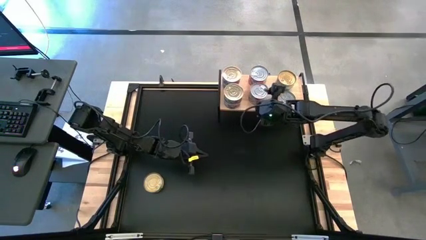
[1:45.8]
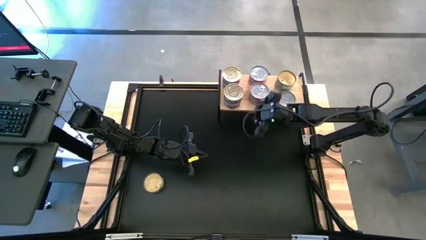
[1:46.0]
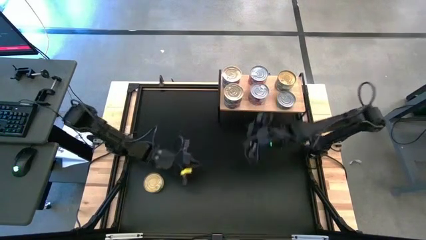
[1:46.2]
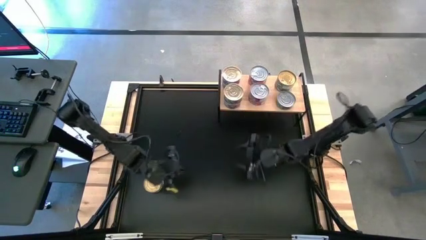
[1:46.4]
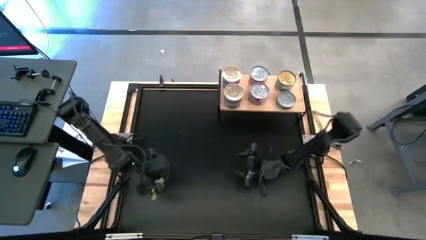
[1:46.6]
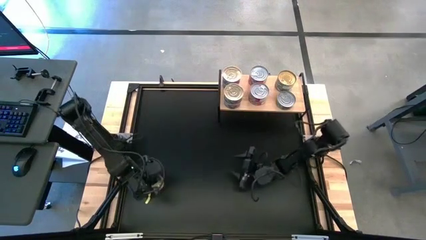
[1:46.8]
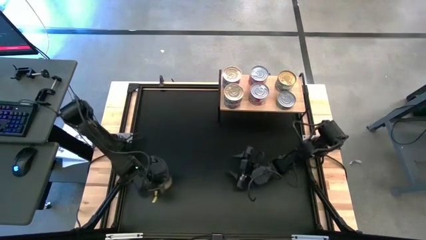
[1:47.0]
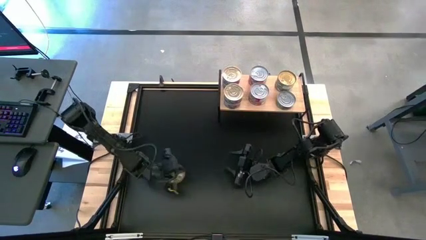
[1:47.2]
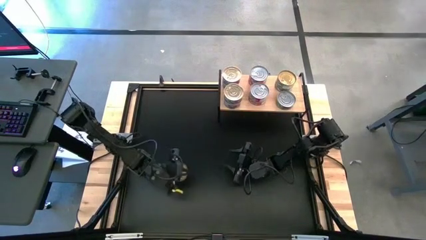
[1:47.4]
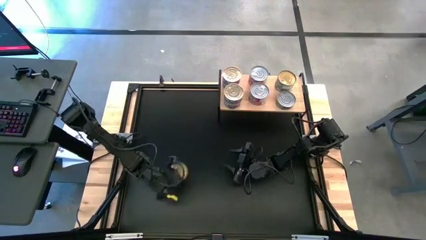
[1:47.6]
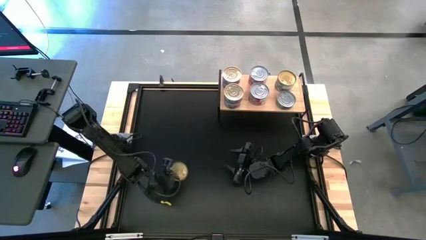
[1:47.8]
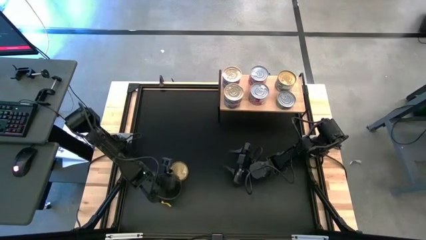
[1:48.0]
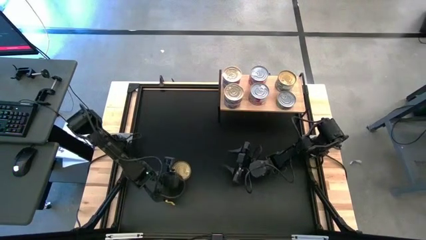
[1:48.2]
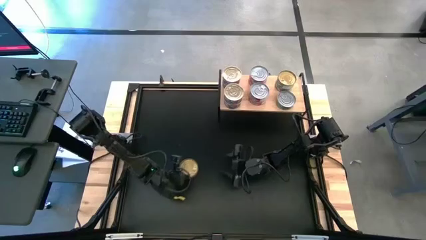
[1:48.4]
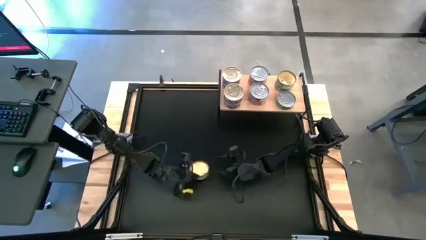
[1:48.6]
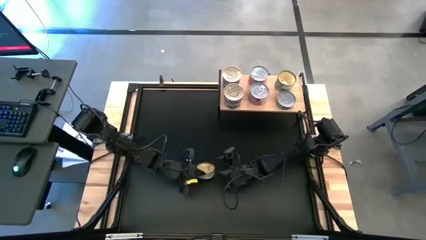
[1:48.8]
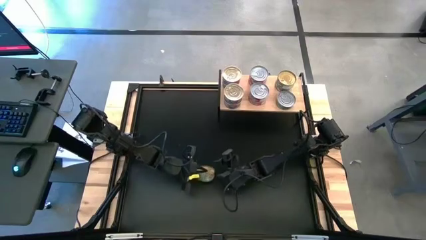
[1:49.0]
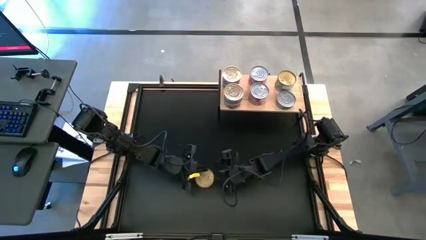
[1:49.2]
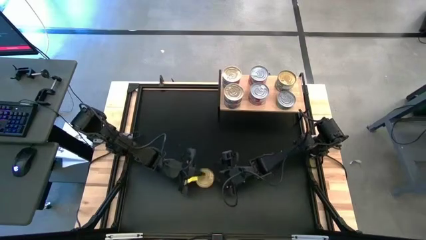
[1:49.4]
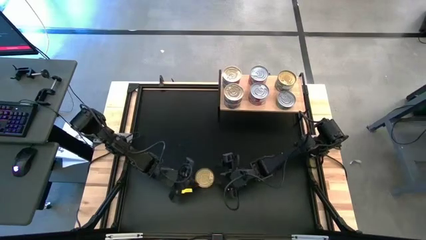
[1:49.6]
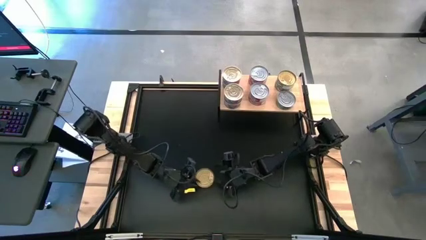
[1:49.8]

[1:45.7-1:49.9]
Task: Stack canned seafood by type on shelf
Stack the green tuna can on top of the other green tuna can on the shelf

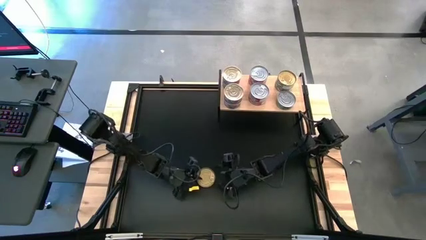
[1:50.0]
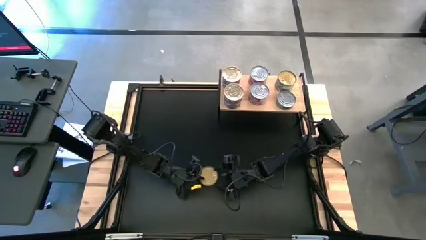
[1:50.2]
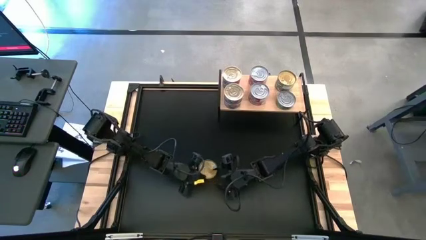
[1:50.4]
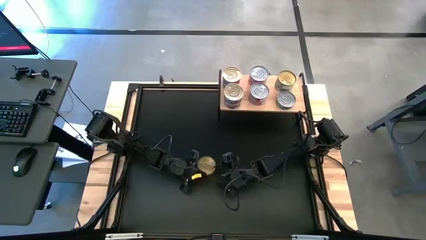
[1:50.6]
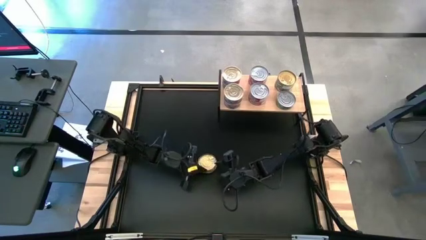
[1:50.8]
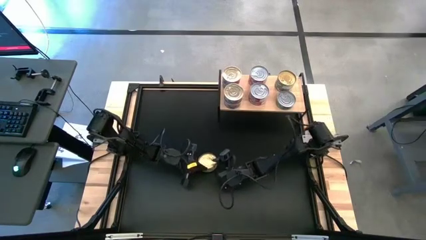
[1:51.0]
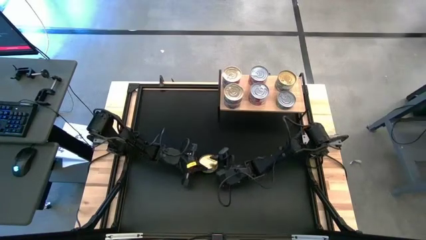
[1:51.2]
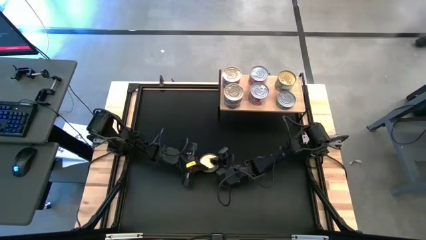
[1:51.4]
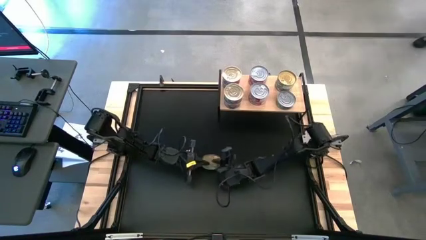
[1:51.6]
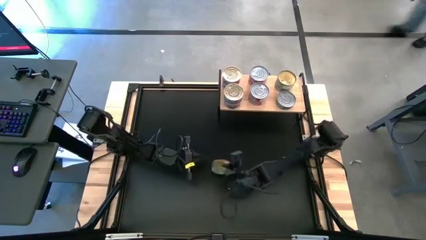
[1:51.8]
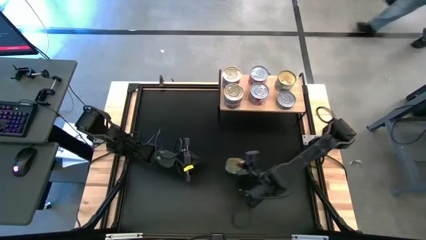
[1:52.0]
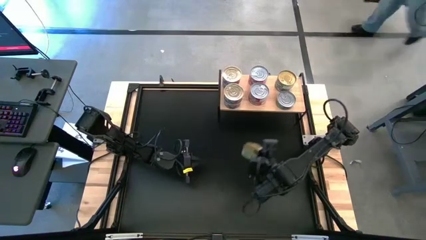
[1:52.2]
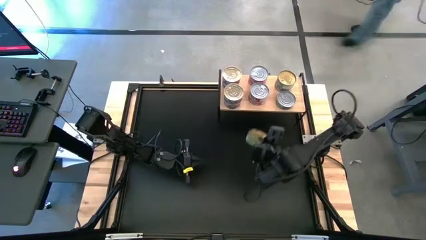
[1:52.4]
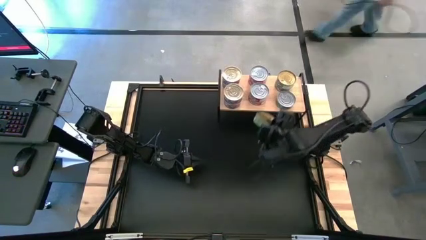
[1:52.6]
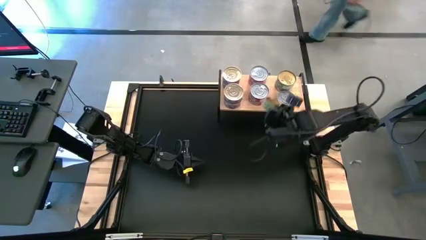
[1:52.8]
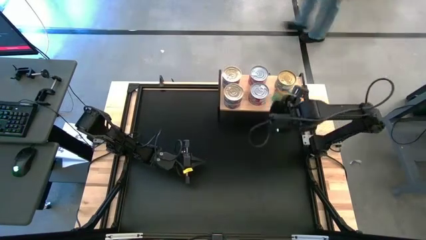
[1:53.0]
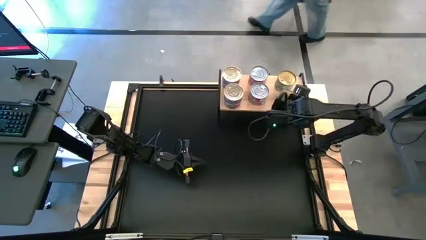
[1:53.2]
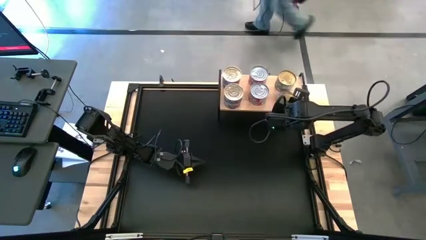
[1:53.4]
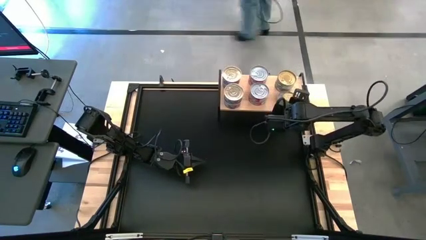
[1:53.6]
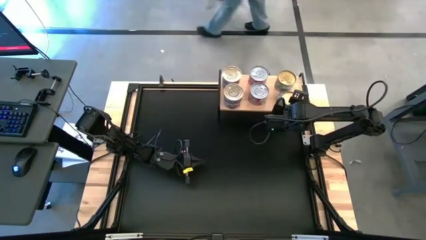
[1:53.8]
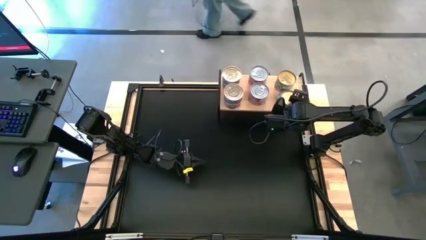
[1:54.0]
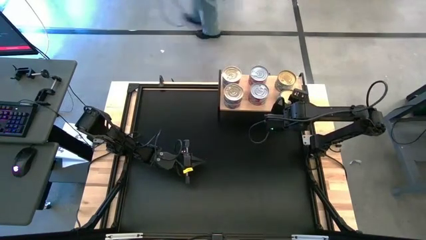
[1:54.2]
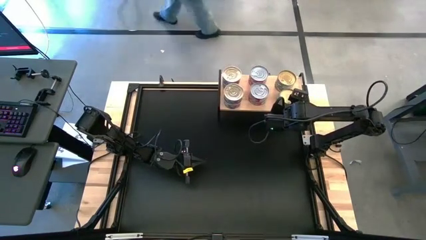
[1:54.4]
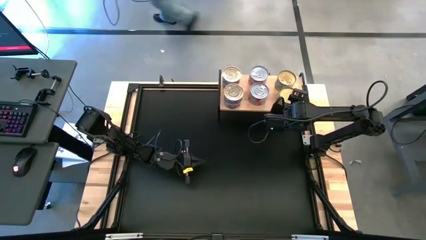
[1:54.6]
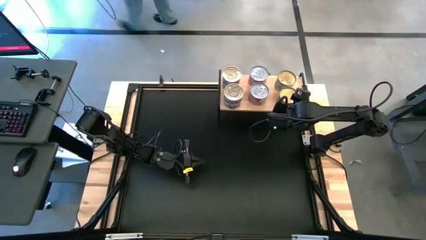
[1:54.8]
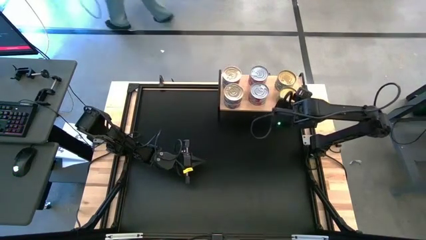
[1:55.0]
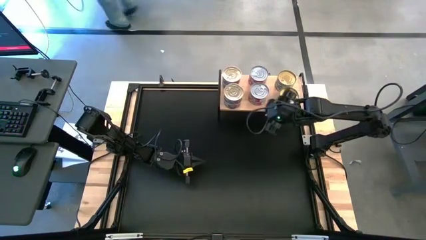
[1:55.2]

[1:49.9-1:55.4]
Stack the green tuna can on top of the other green tuna can on the shelf

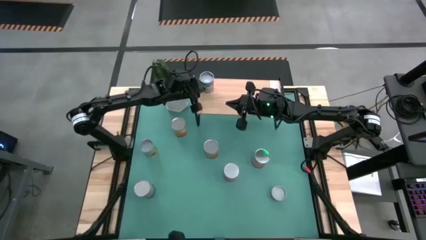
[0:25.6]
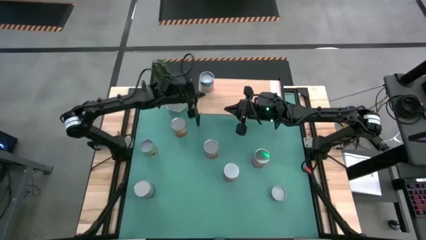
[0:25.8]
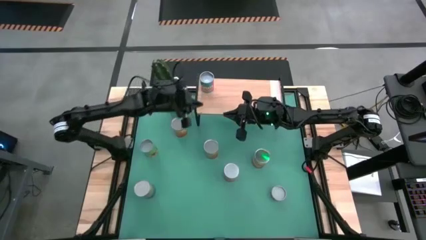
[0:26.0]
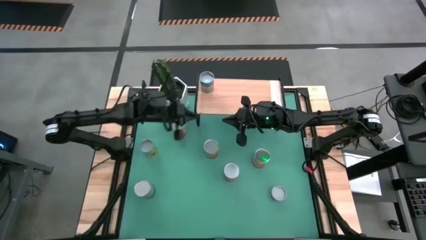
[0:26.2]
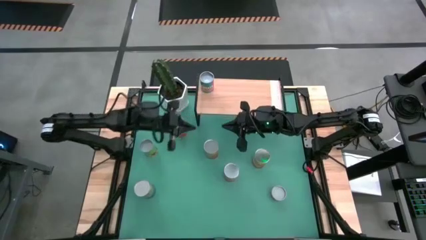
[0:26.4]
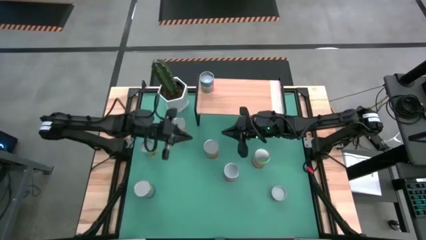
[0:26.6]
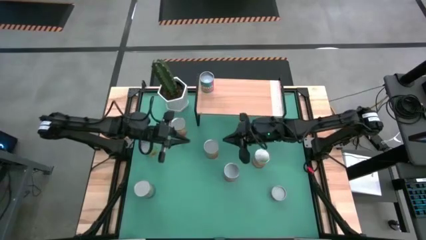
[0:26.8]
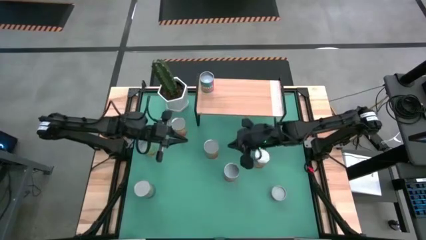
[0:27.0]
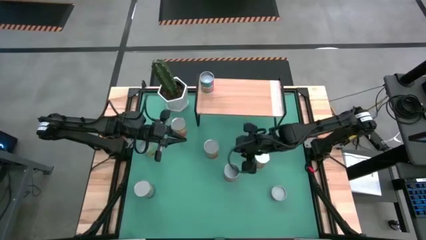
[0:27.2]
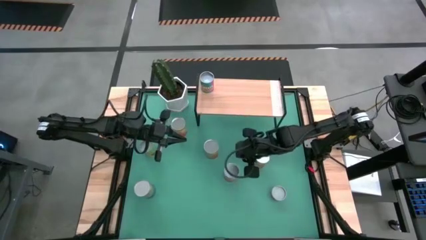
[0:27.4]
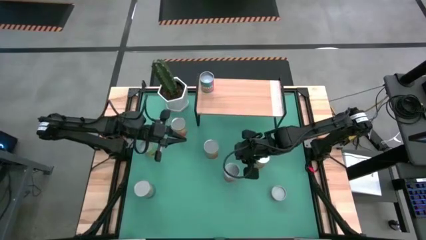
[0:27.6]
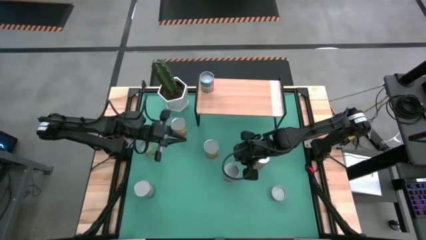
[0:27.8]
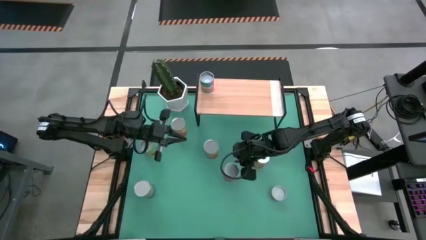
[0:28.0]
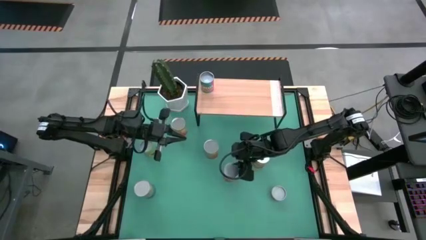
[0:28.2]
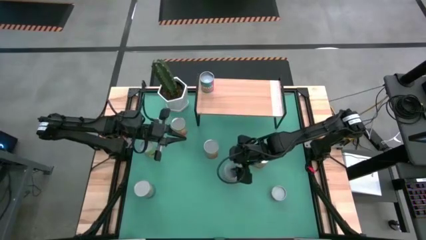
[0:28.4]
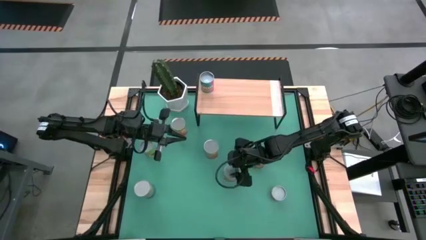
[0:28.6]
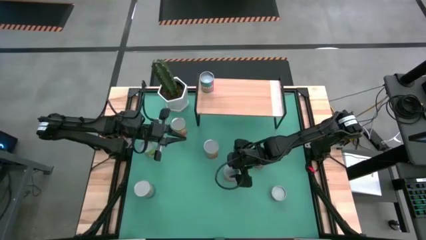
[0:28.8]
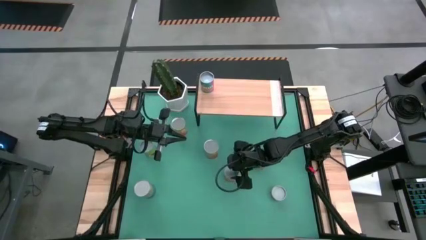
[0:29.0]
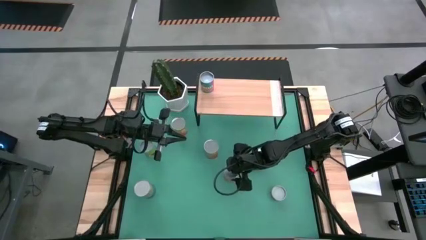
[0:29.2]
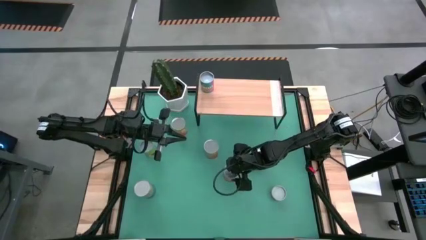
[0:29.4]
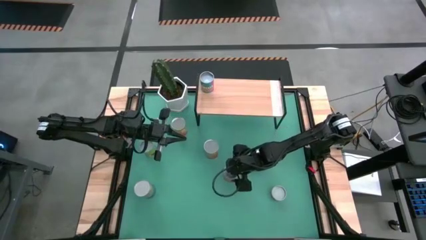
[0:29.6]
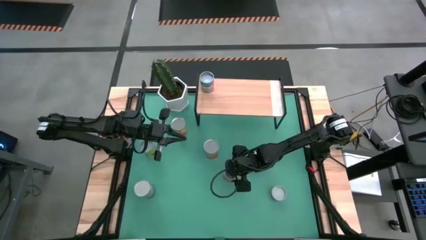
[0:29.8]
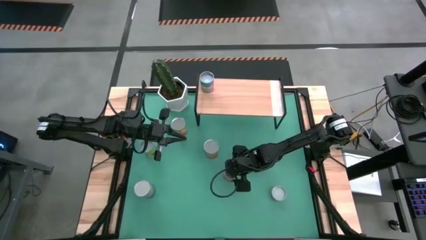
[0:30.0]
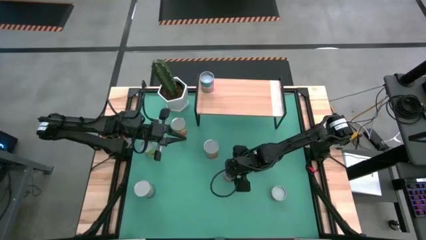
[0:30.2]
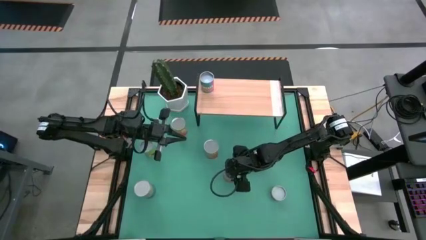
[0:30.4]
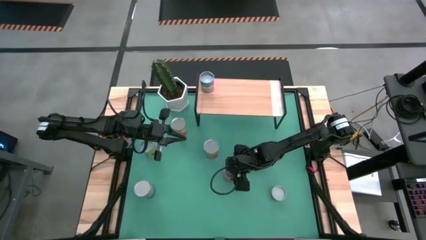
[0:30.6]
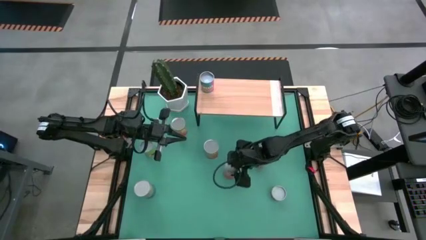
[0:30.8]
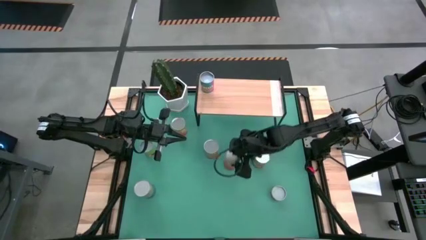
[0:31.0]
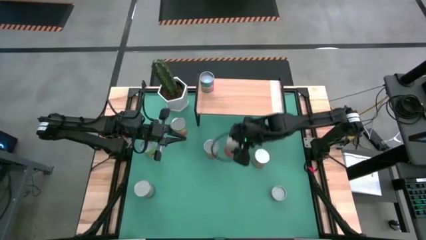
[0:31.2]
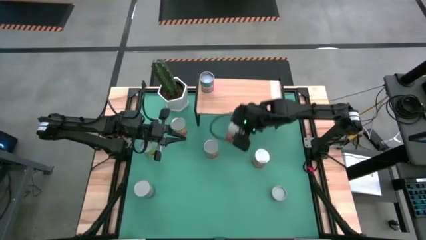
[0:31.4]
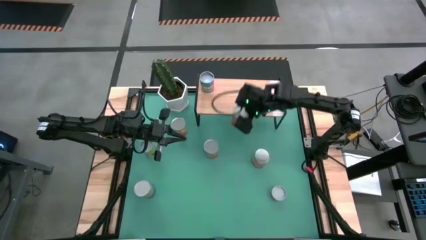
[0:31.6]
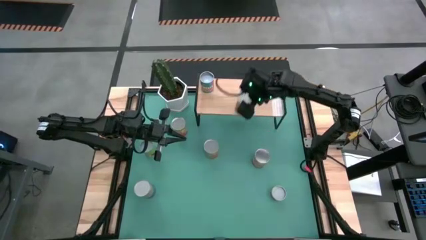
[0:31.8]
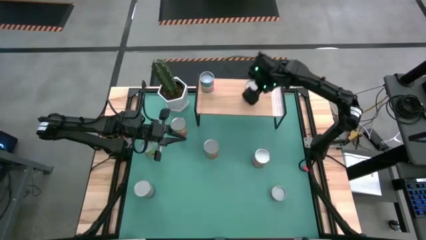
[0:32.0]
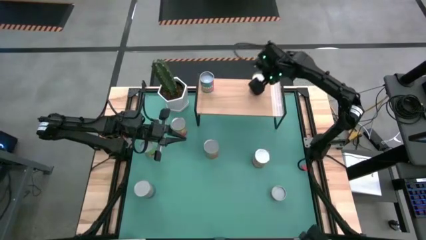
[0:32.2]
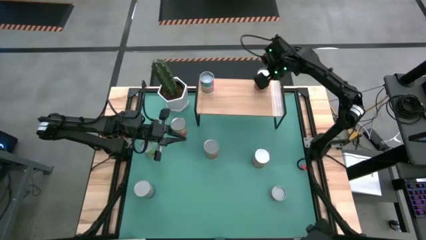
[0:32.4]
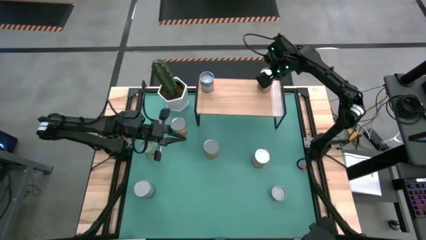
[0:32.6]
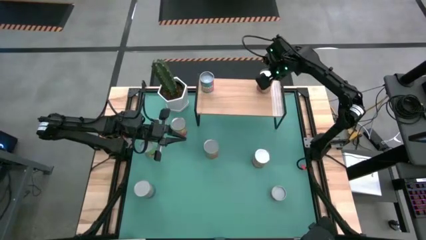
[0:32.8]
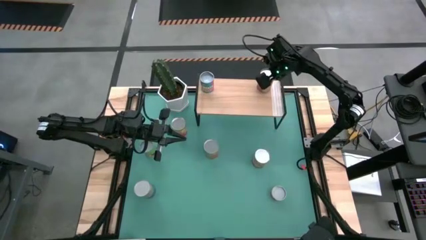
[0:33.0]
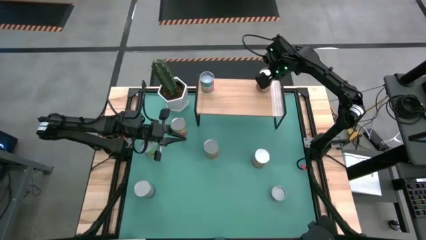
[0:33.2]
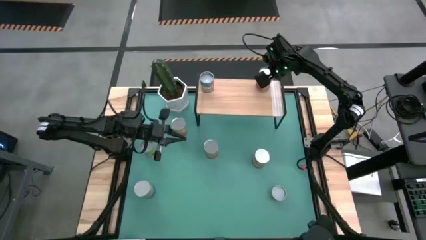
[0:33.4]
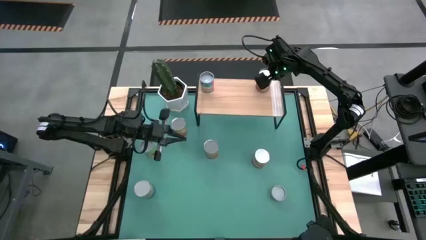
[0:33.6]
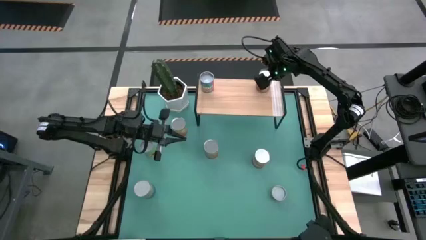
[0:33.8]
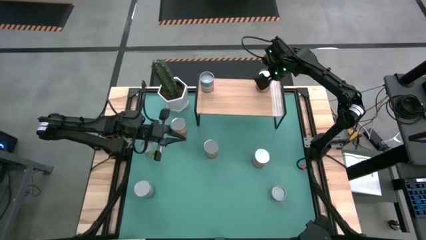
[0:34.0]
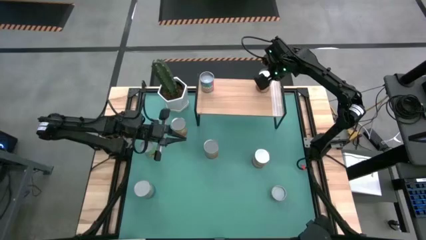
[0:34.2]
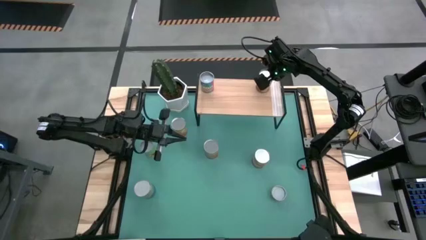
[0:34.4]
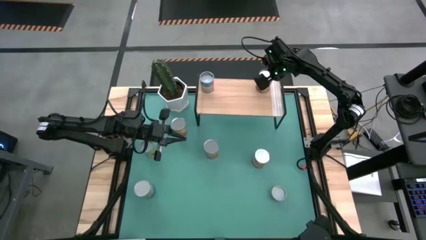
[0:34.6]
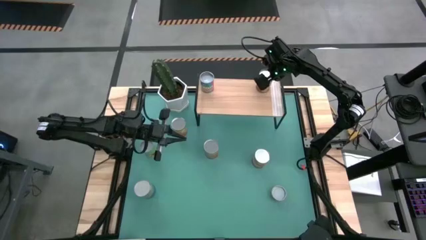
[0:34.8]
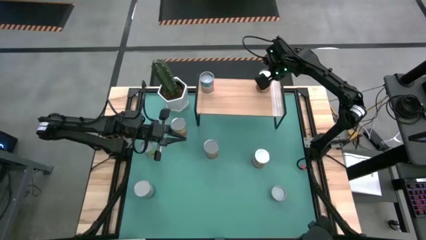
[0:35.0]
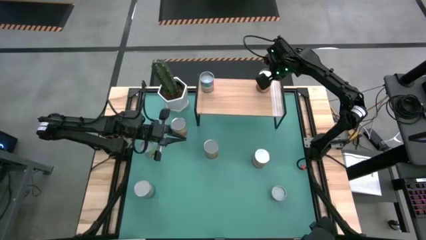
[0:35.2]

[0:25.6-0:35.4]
Task: Pick and place cans onto a shelf
Put the canned pineapple on the shelf
